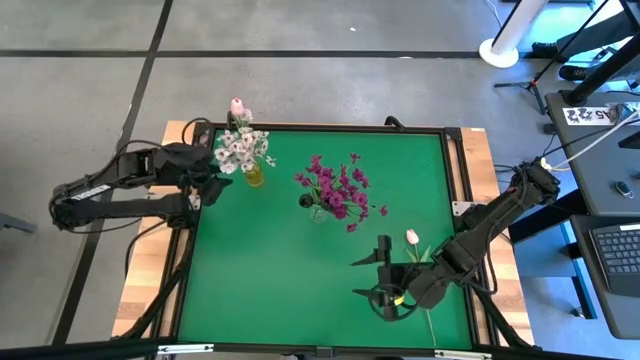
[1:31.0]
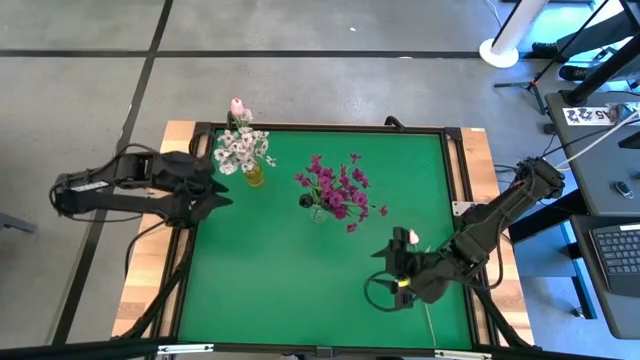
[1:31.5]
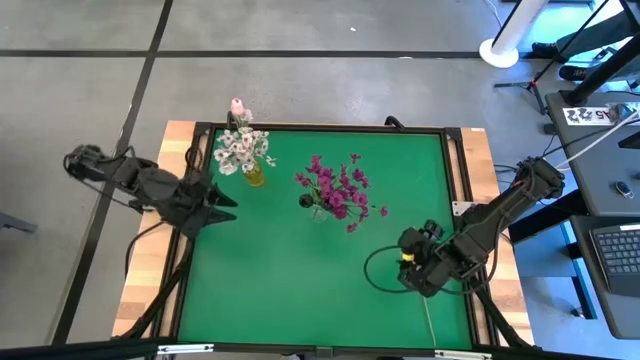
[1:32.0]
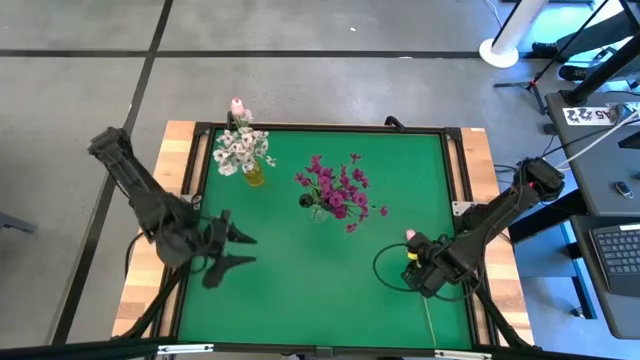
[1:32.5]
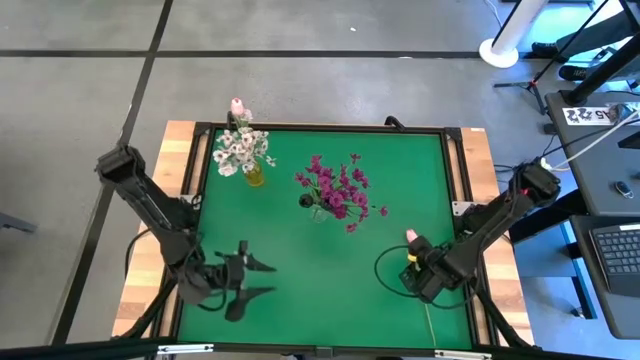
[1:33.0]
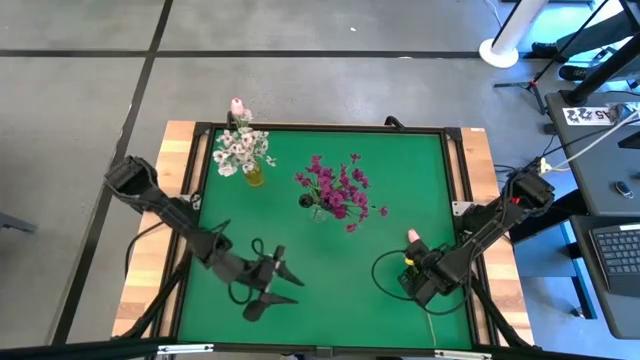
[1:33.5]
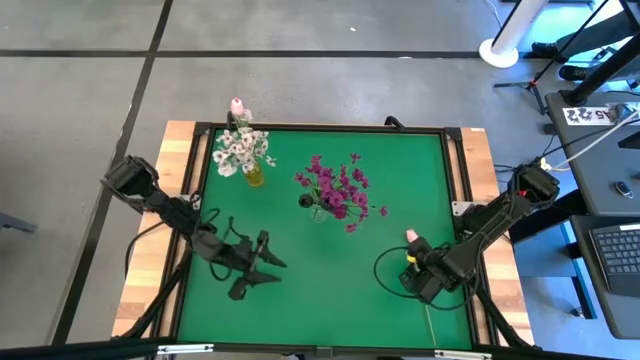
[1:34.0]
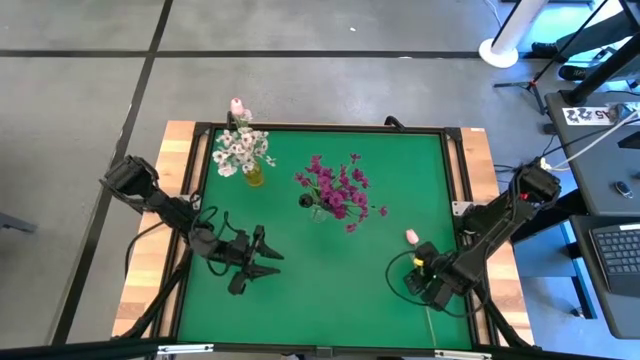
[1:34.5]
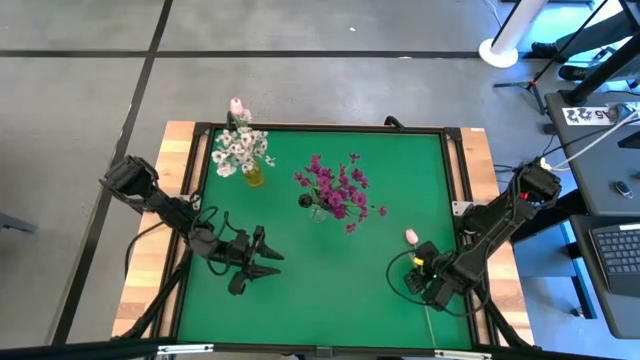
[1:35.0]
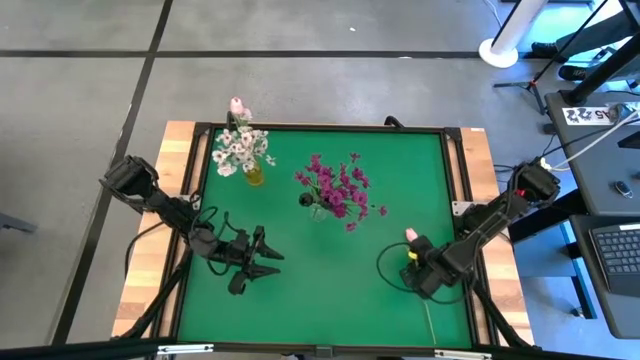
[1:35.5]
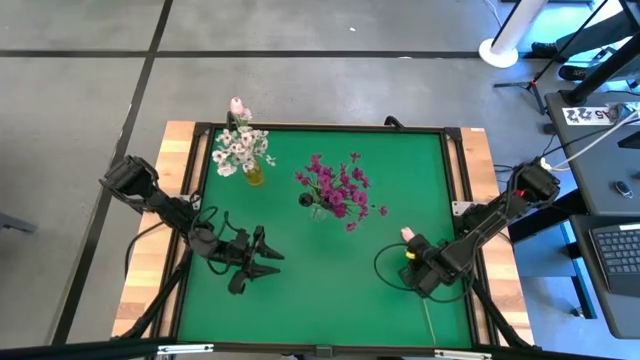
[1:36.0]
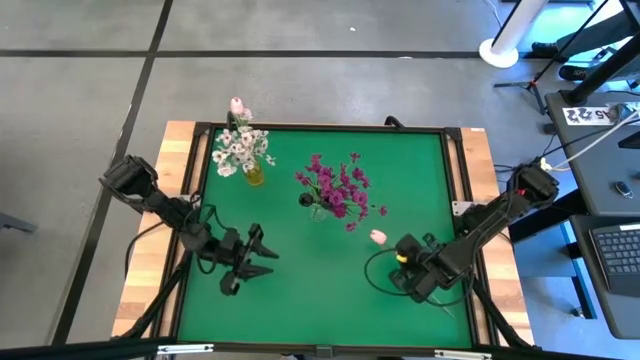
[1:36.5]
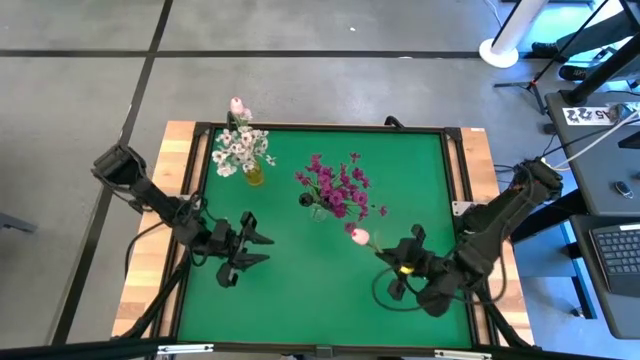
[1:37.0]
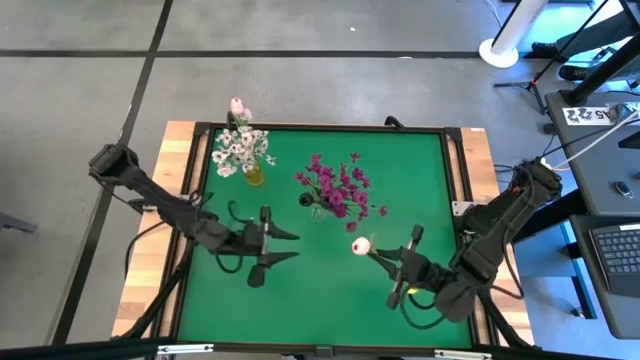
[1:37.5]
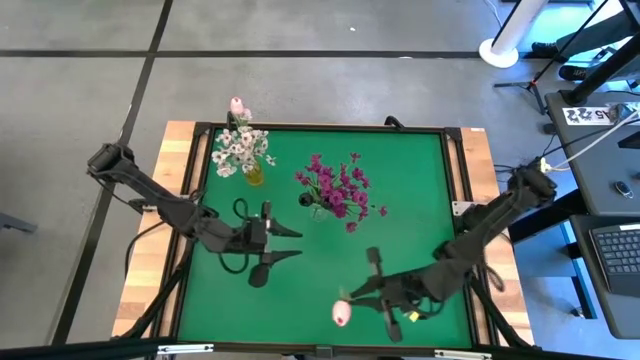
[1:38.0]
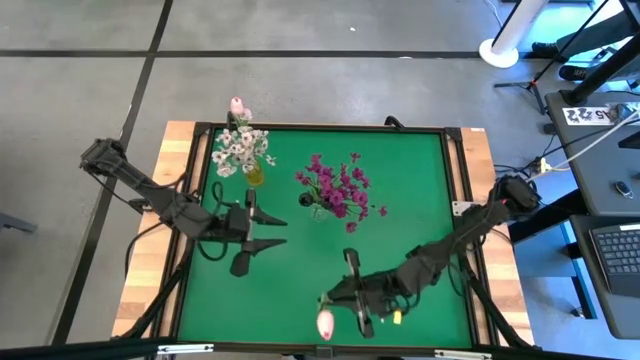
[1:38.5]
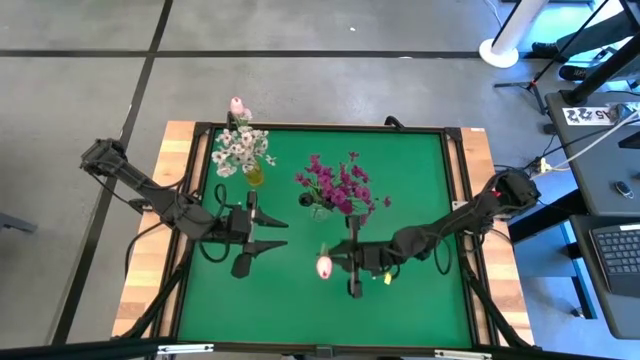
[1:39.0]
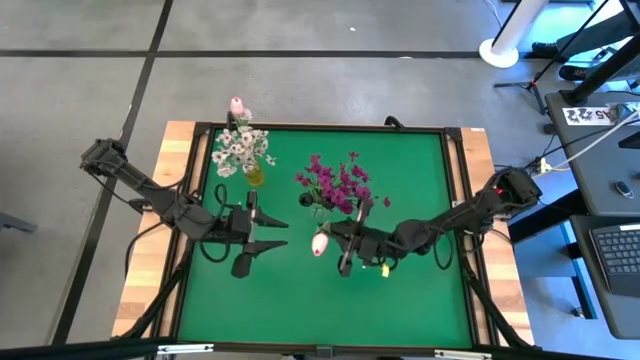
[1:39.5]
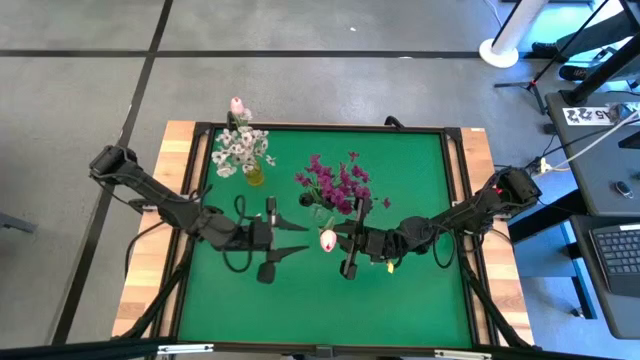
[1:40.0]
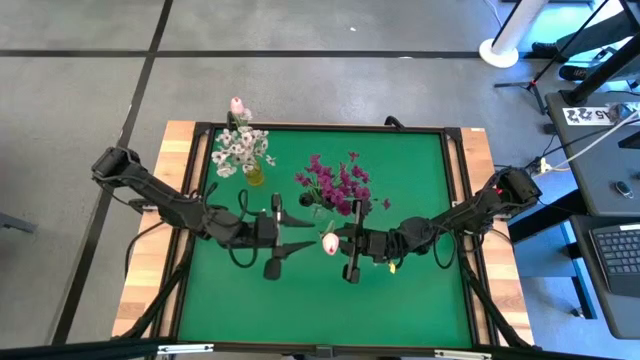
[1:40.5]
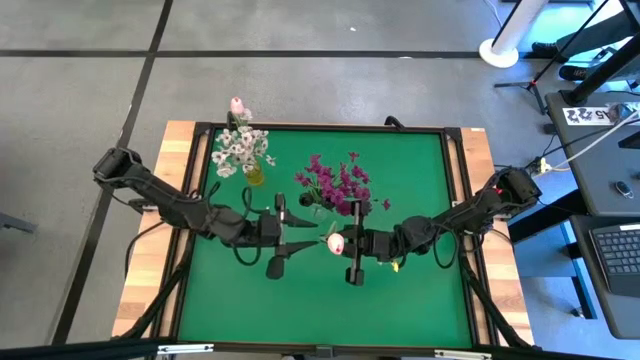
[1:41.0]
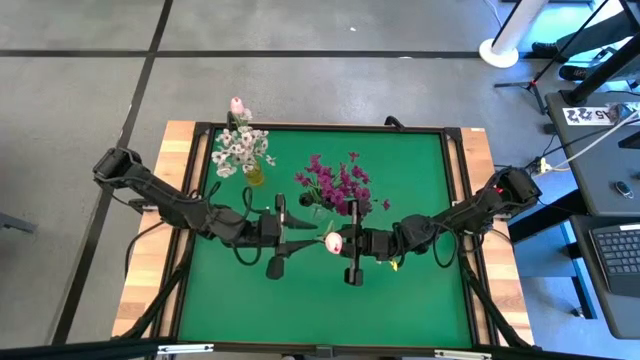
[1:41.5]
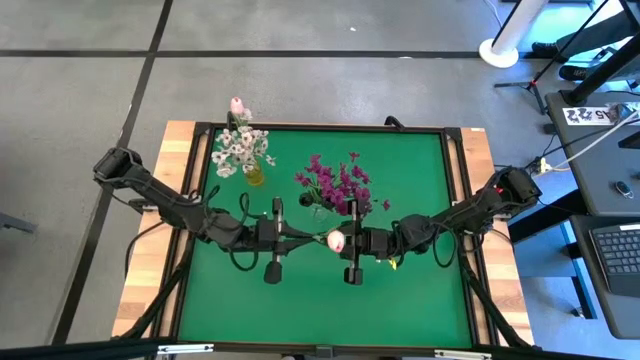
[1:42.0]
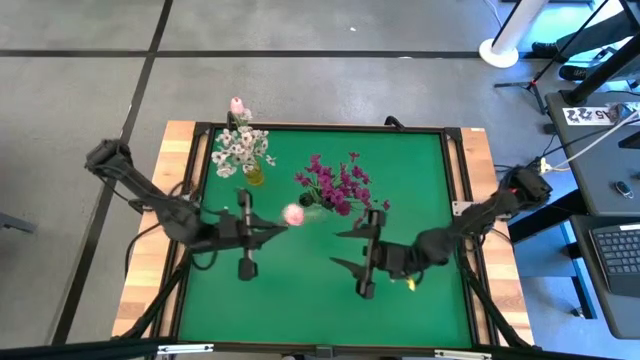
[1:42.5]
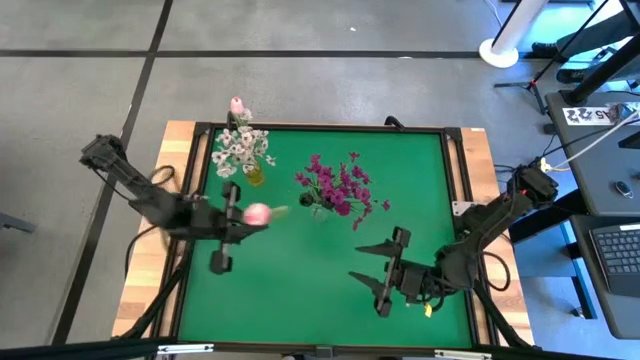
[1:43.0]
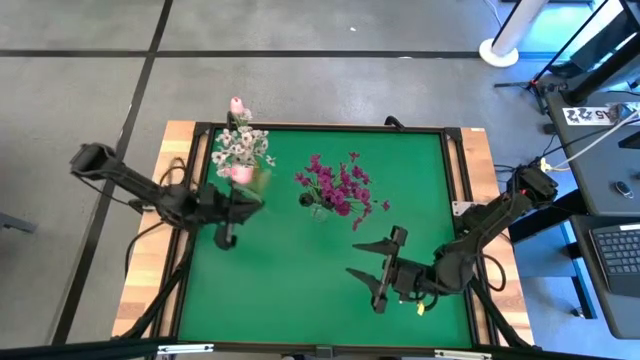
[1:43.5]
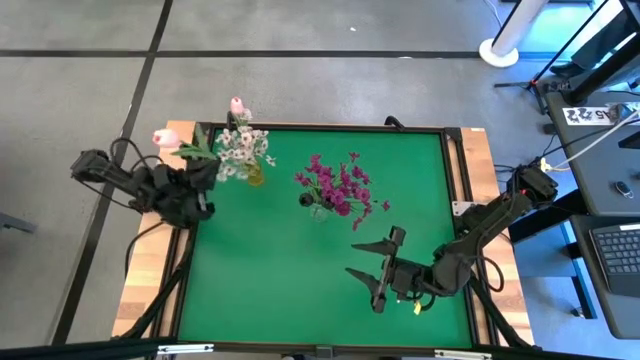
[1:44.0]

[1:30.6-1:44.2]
Task: Sort flowers into vase by color
Put the pink tulip into the yellow vase

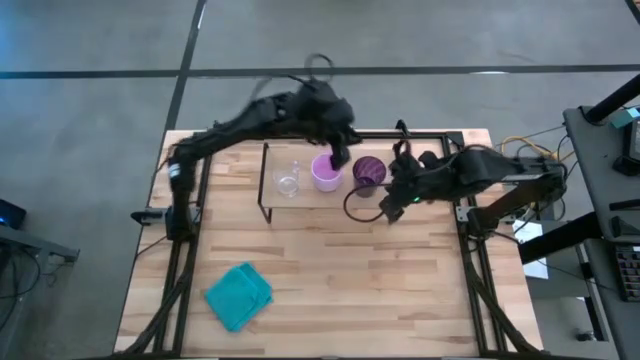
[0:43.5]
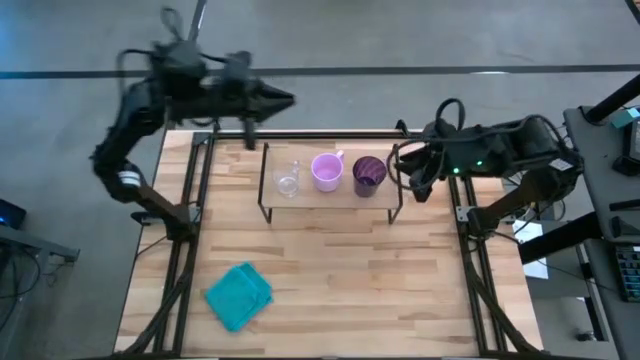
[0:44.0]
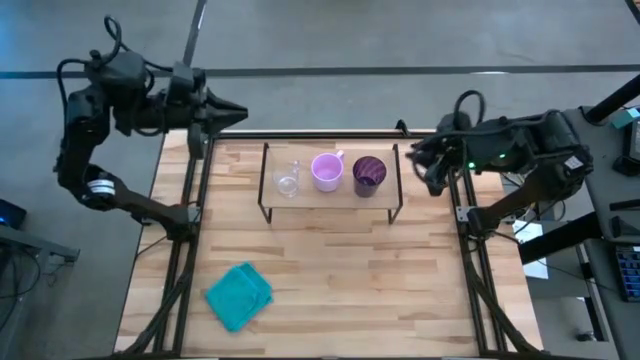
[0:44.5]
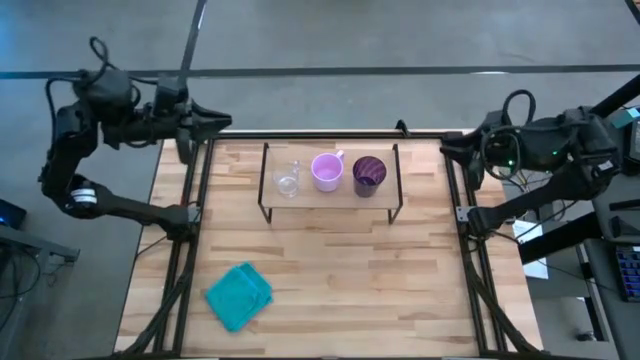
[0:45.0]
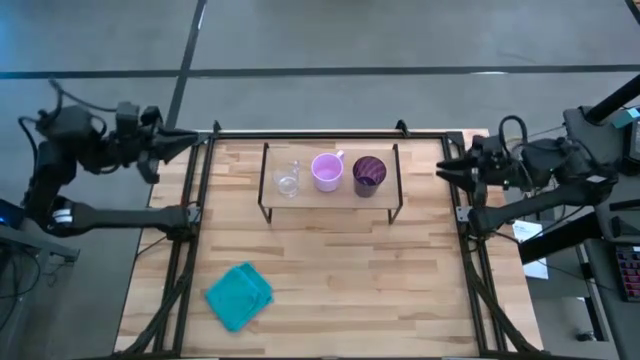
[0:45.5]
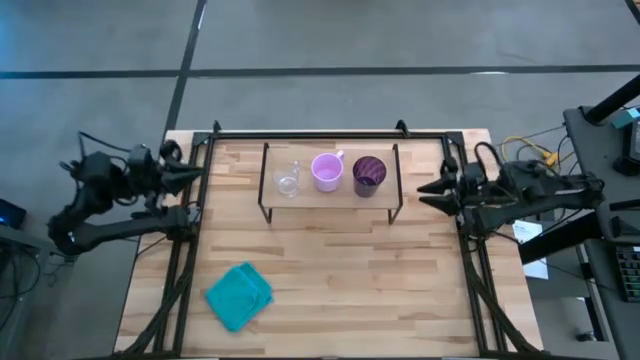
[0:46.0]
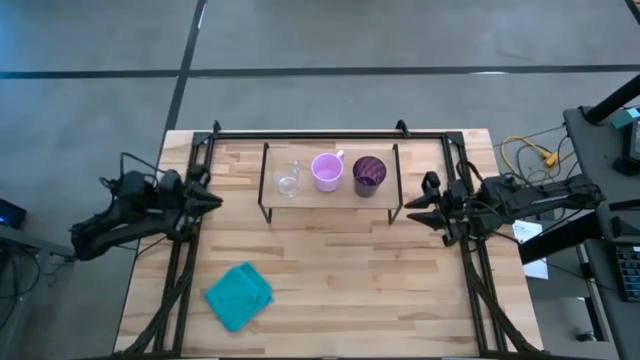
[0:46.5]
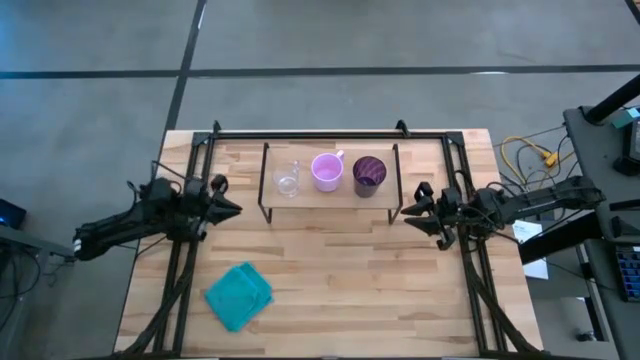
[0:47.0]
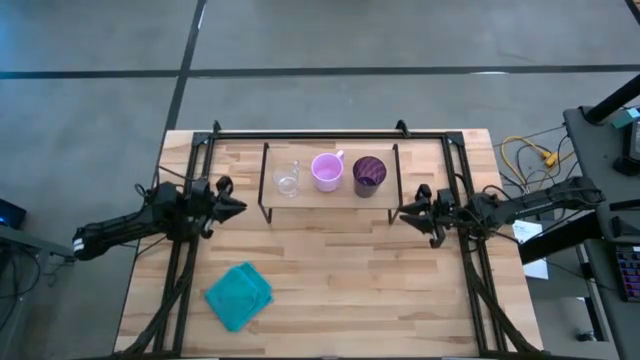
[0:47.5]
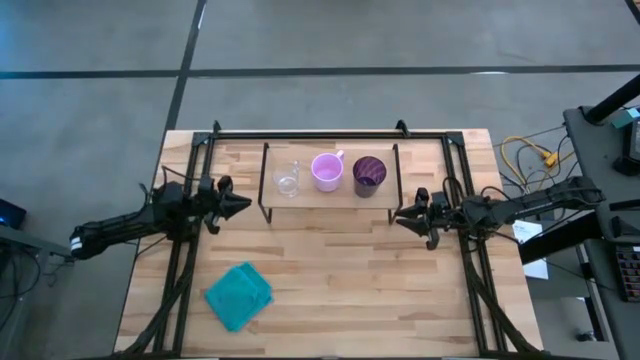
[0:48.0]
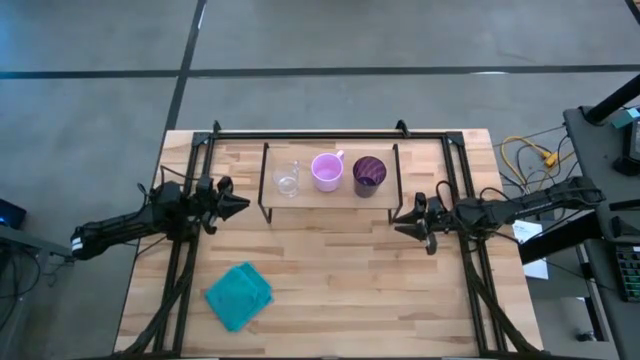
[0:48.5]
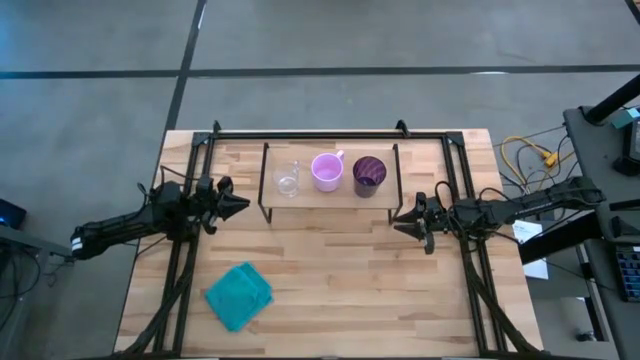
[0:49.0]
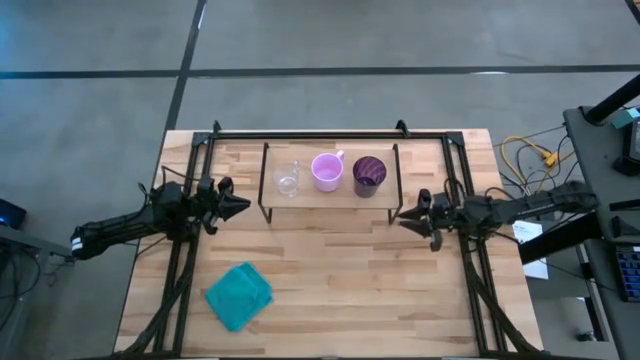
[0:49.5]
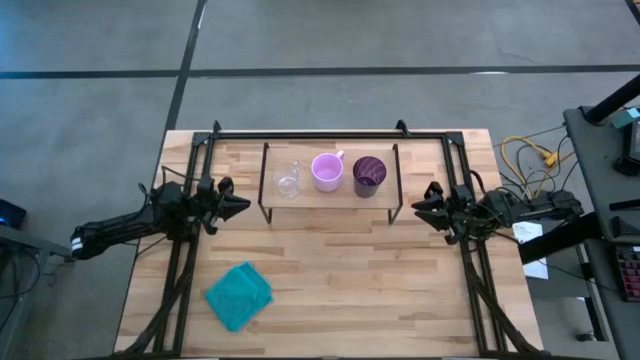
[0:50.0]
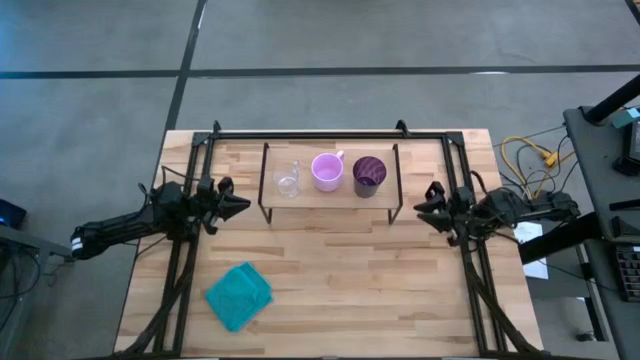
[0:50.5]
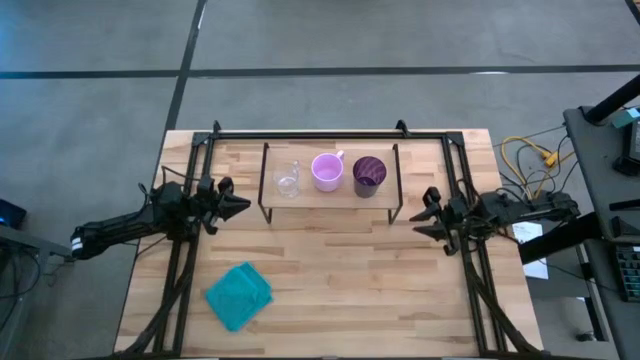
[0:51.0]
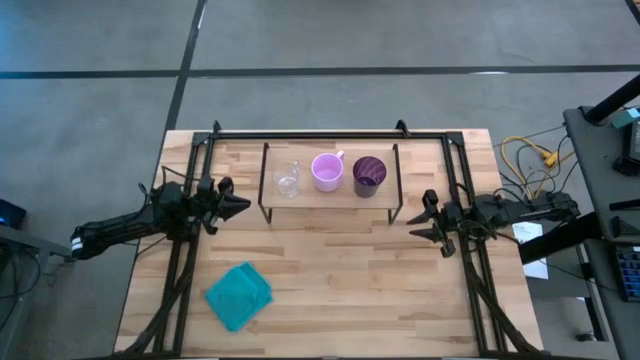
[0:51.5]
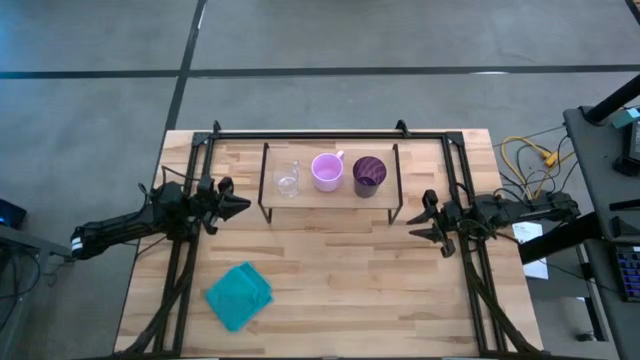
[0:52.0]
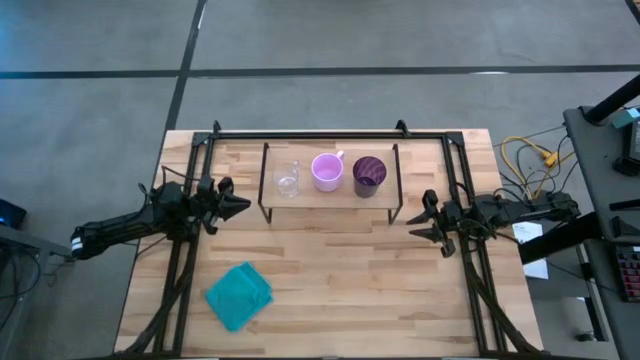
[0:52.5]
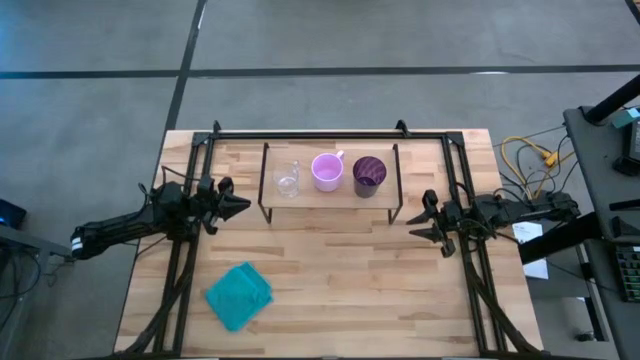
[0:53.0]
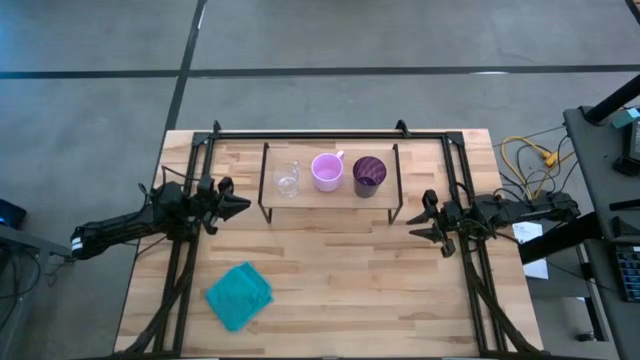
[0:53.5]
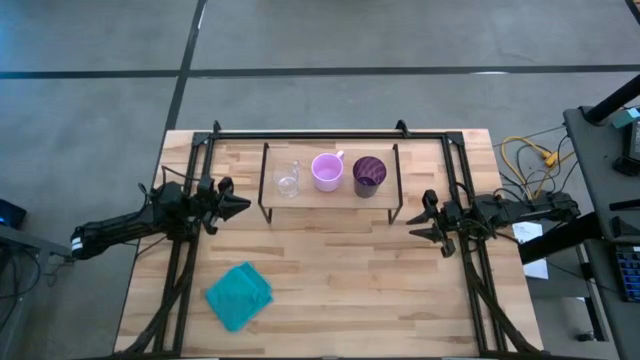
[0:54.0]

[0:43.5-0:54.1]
Task: Stack small to large cups/mugs on shelf
Return to Home Position
